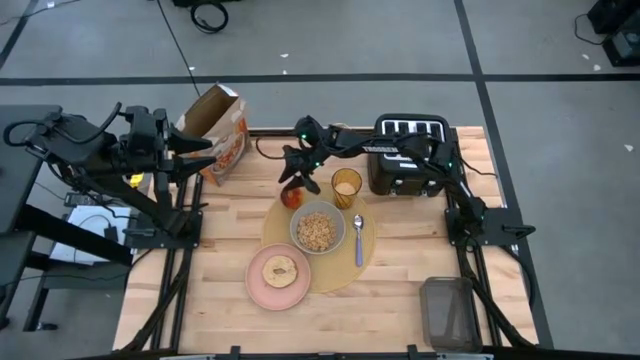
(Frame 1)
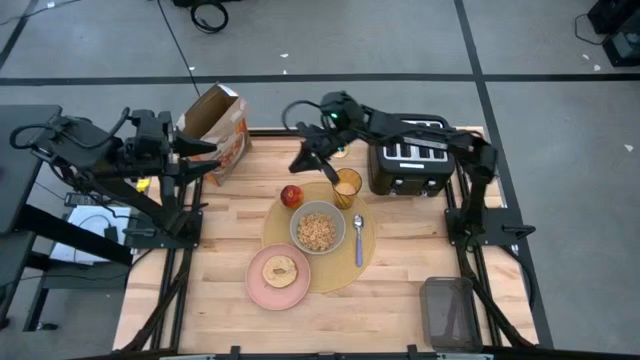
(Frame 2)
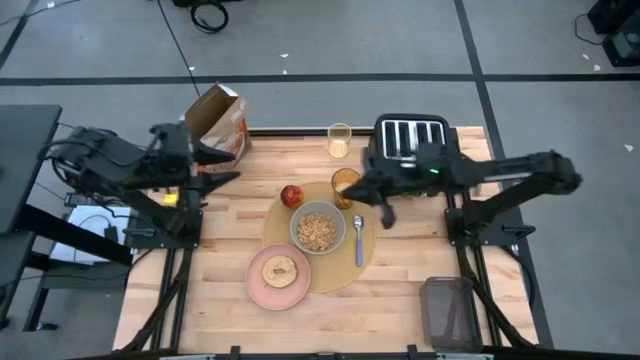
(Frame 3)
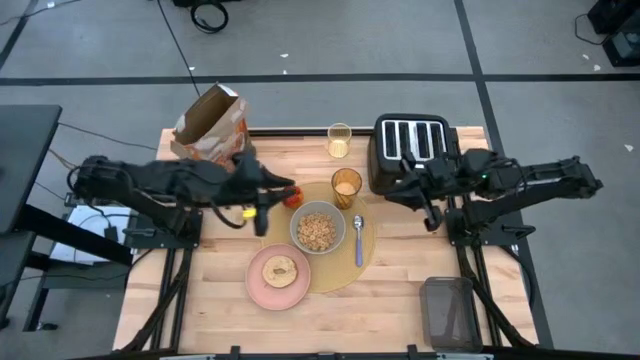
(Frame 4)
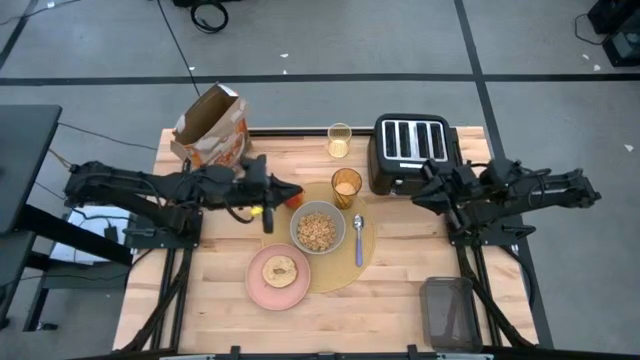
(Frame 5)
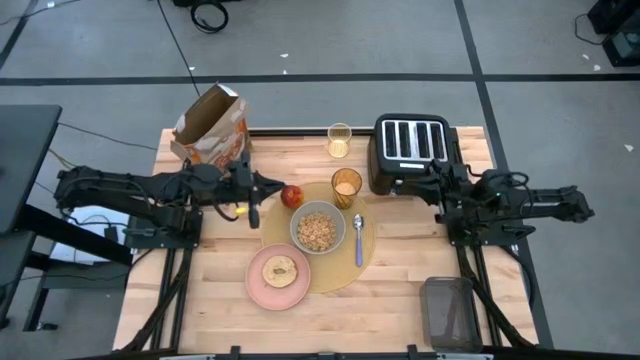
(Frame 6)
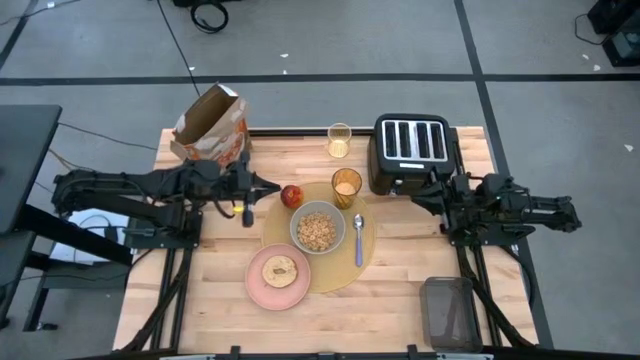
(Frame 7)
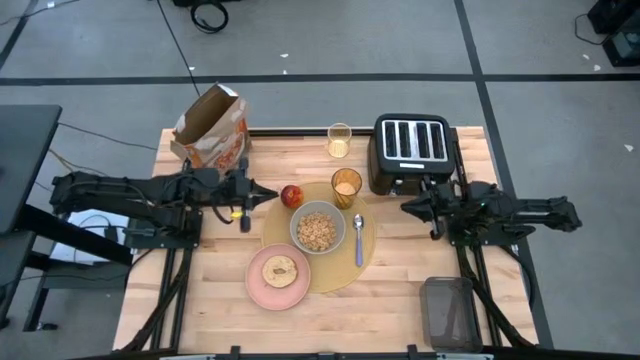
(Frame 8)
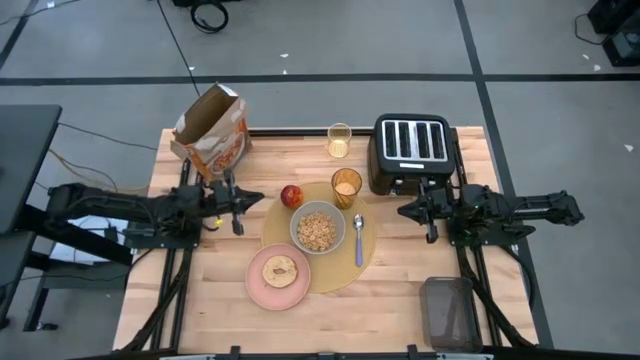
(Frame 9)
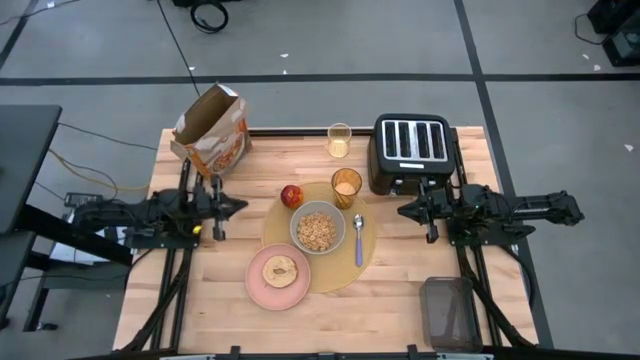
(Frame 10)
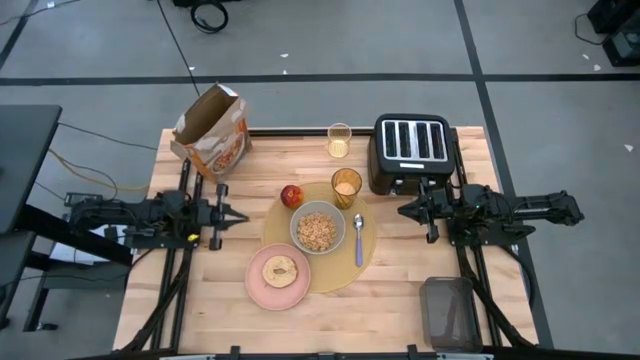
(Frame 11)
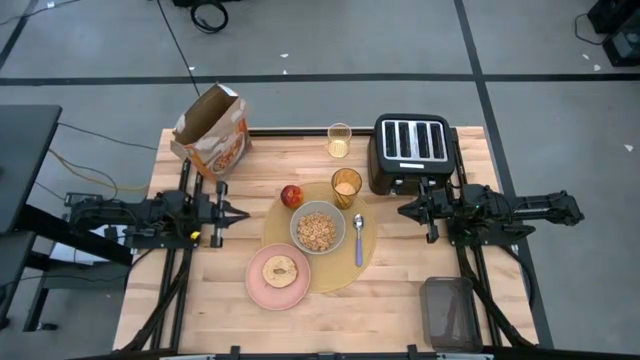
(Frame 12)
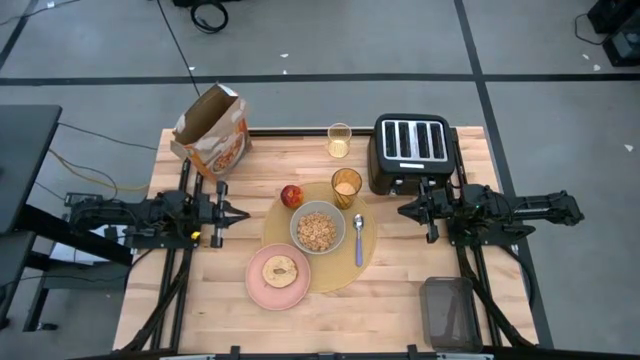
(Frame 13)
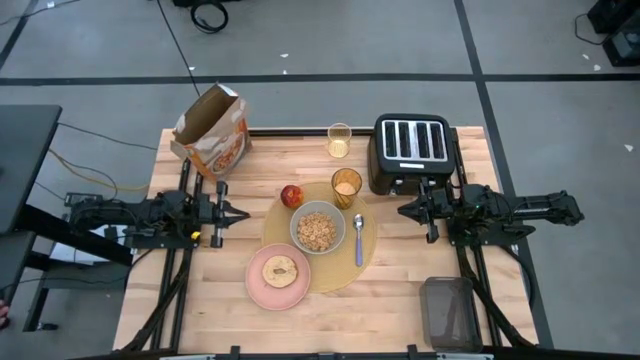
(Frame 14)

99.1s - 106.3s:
Task: Arrange a breakfast setting
Return to Home Position

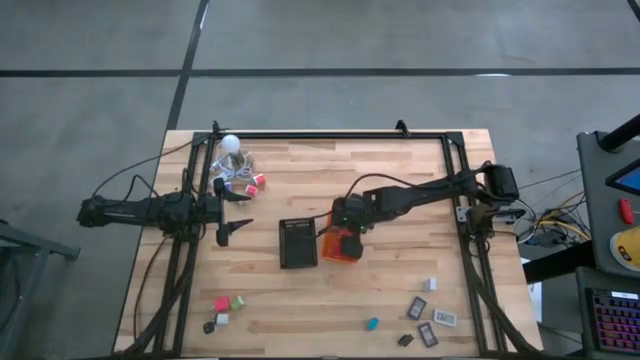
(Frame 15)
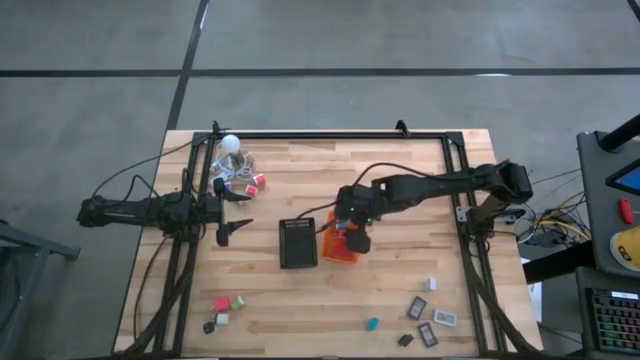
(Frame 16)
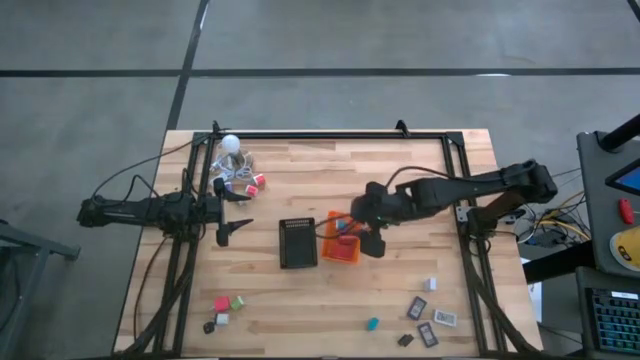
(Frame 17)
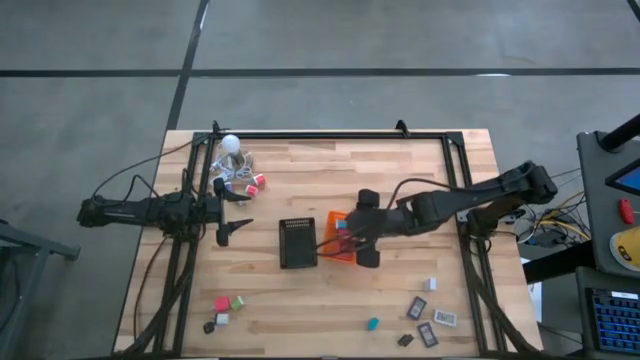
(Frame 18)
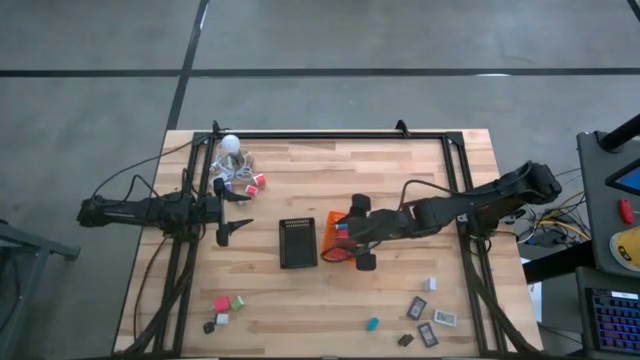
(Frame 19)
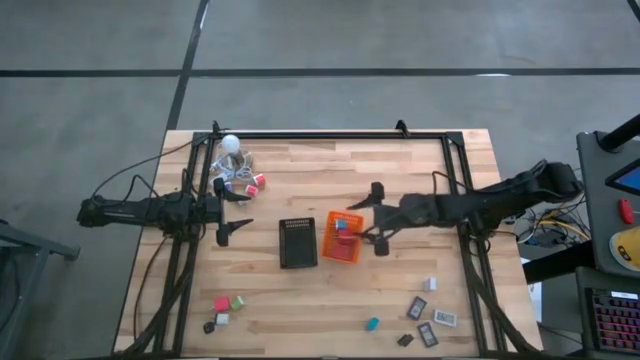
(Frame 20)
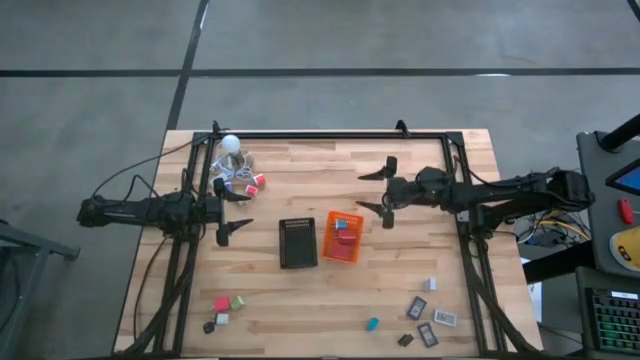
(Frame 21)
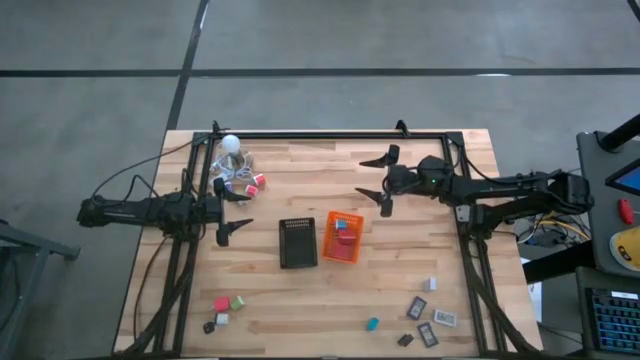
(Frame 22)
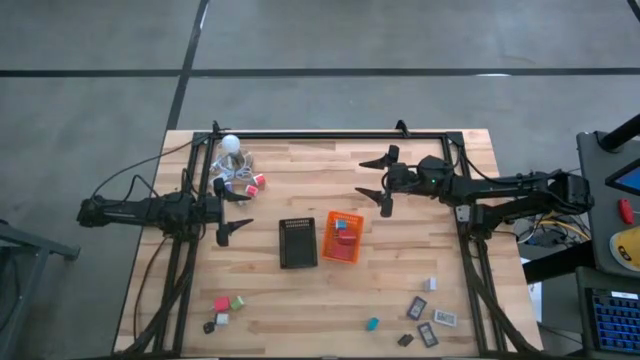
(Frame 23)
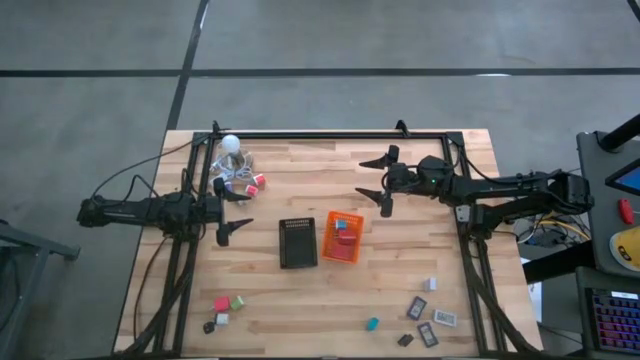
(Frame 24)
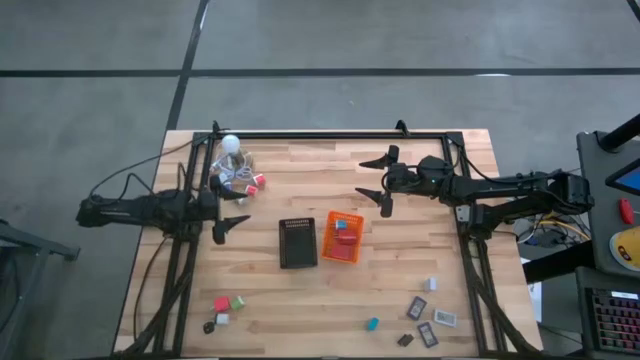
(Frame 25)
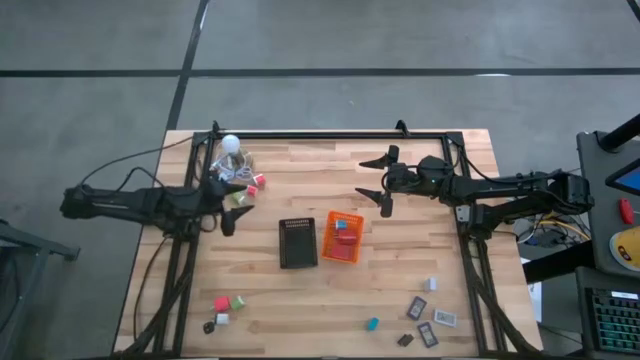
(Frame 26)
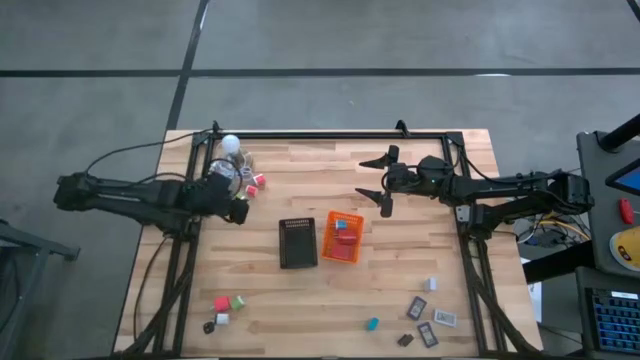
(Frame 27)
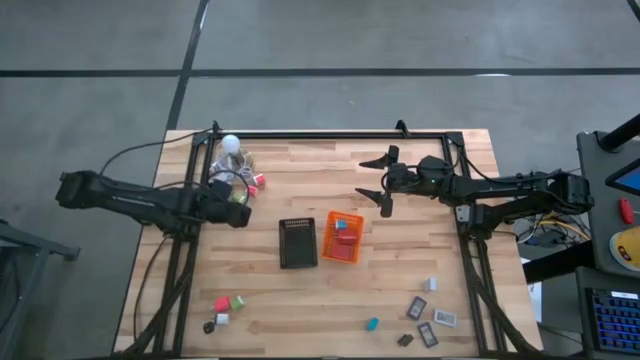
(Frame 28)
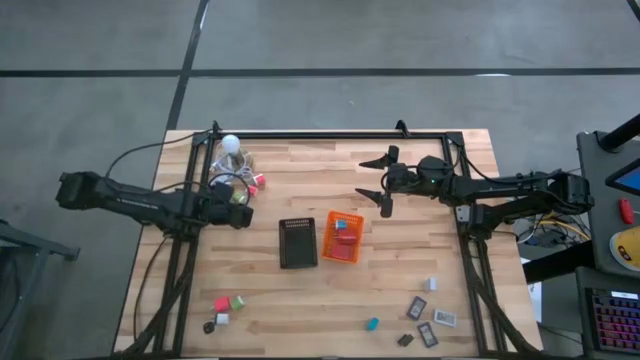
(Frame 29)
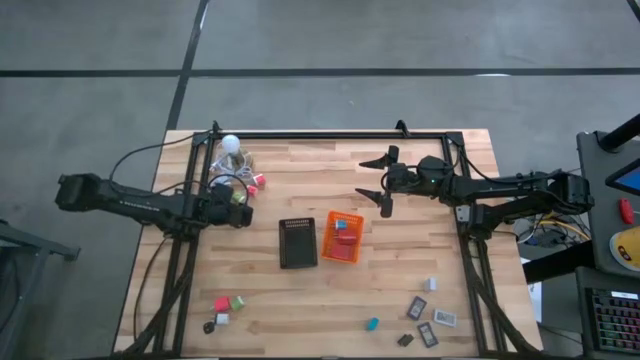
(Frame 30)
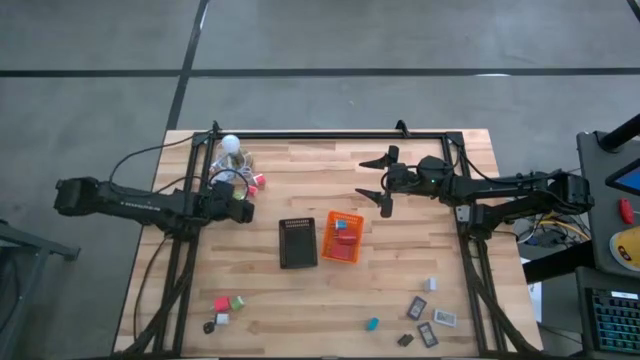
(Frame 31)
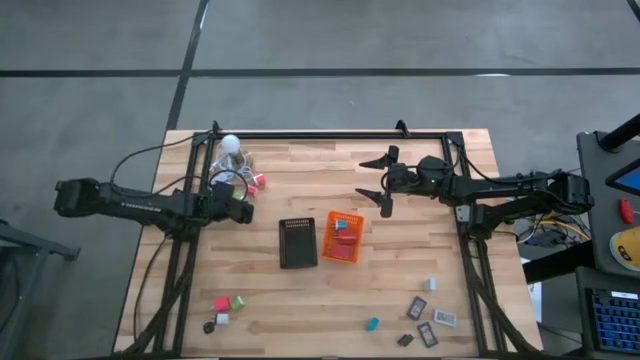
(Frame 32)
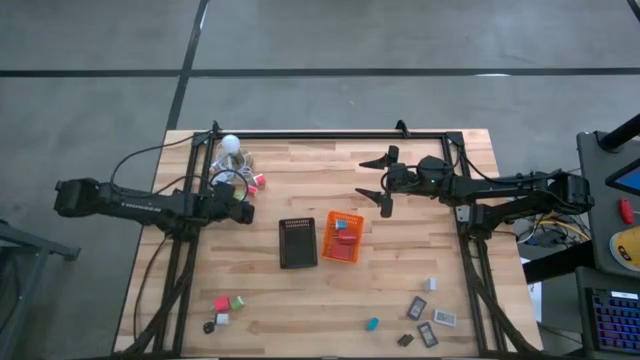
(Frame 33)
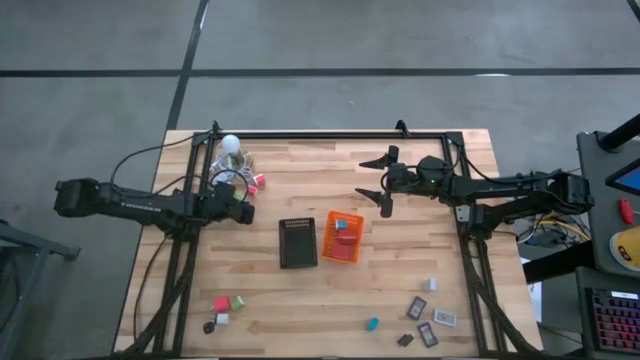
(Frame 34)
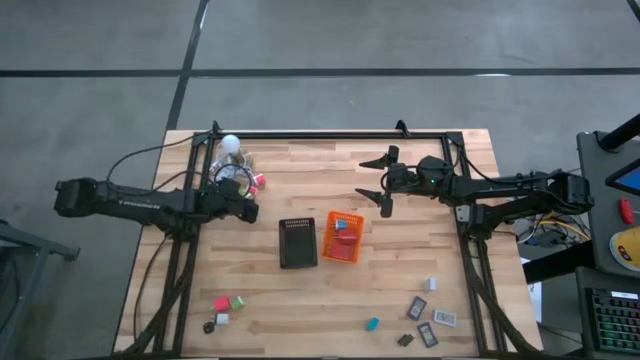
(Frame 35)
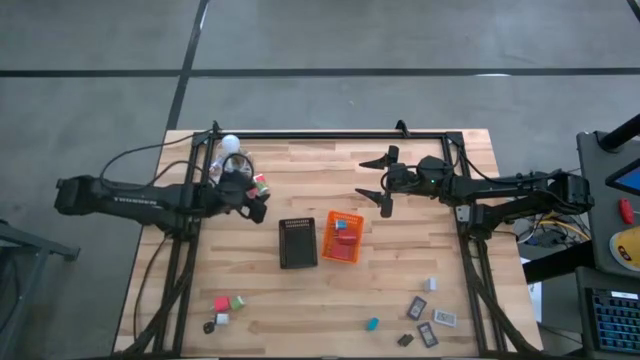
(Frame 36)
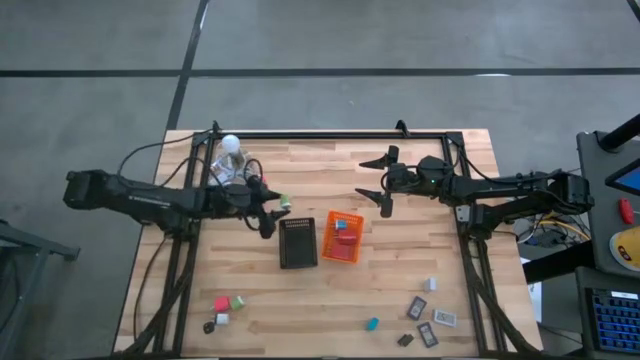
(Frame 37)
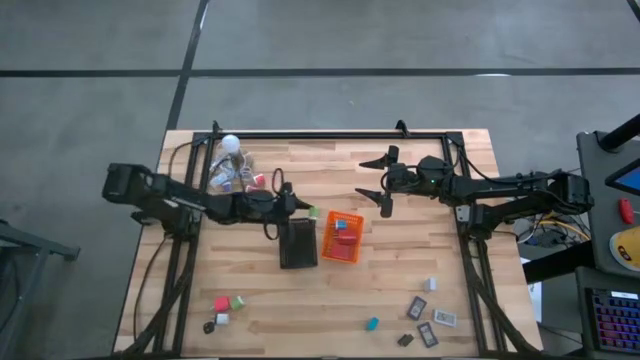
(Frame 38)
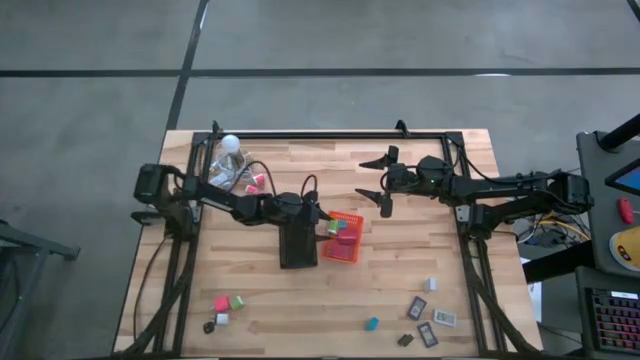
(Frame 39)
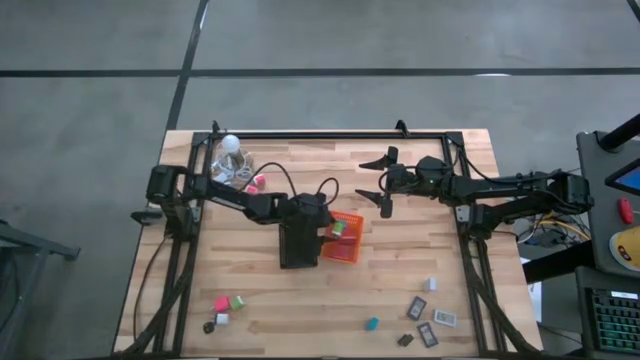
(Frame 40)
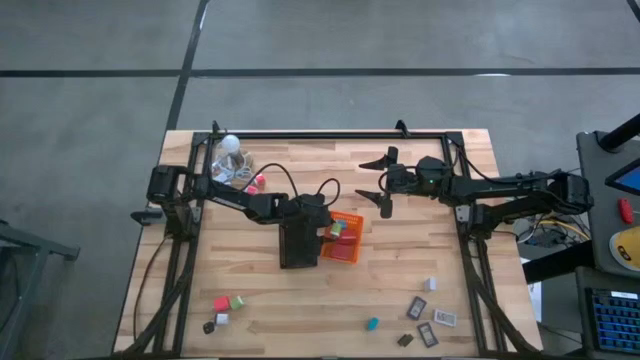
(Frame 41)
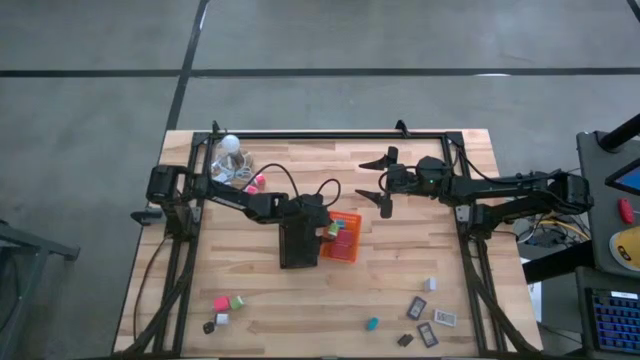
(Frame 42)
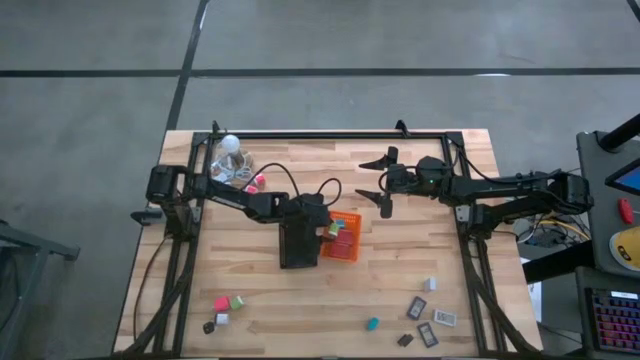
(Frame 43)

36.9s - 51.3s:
Task: Pick & Place Office items
Put the top green charger adapter into the orange bin
